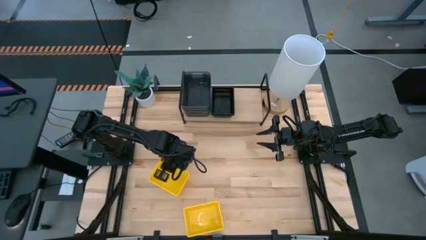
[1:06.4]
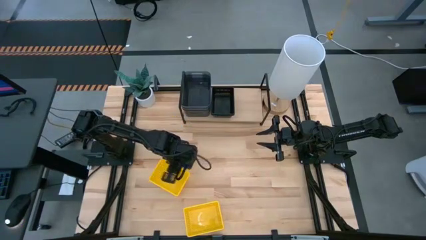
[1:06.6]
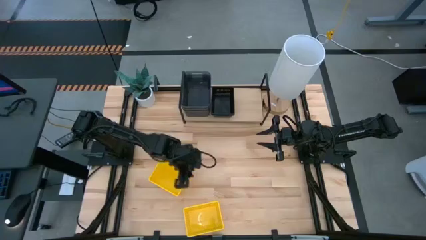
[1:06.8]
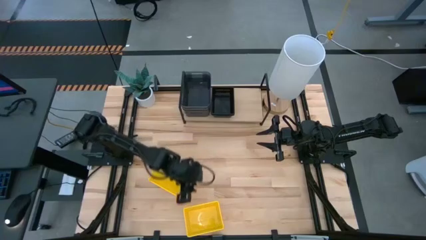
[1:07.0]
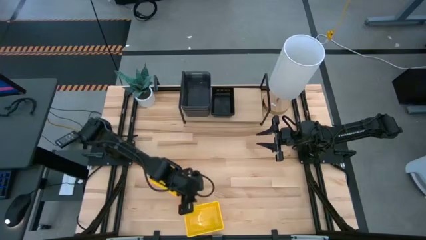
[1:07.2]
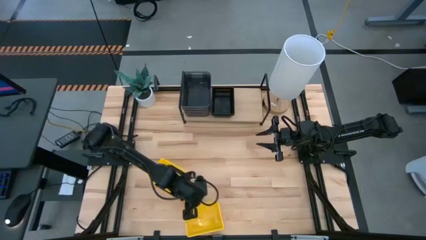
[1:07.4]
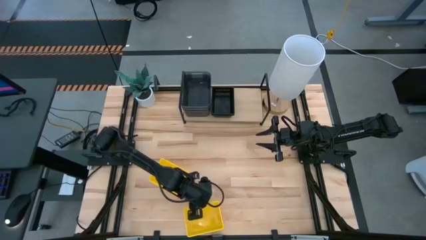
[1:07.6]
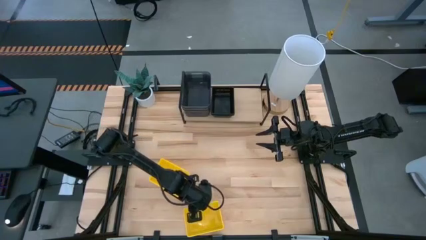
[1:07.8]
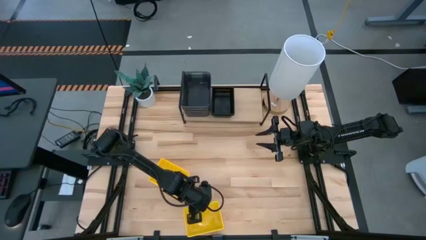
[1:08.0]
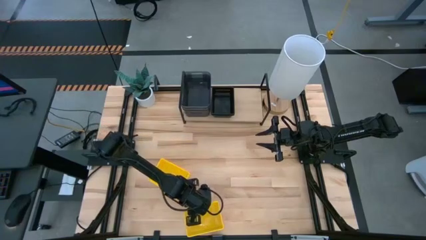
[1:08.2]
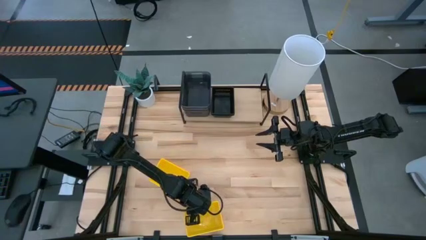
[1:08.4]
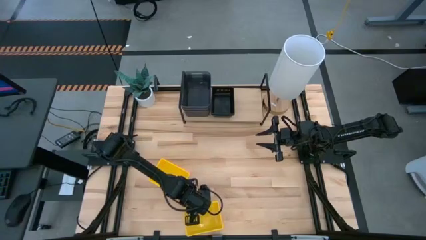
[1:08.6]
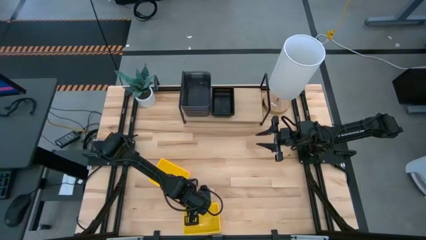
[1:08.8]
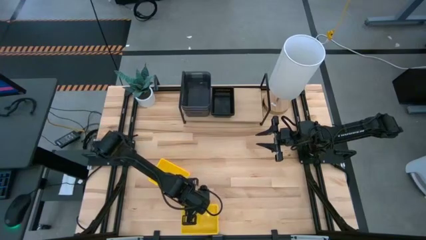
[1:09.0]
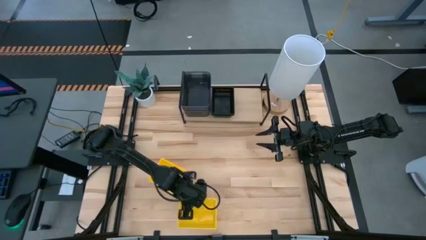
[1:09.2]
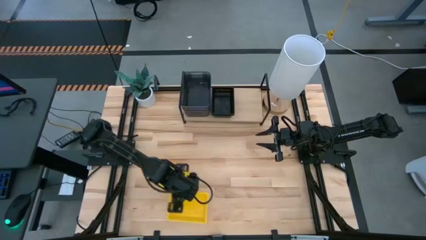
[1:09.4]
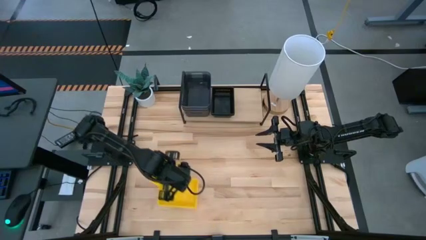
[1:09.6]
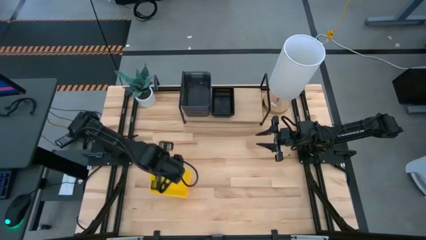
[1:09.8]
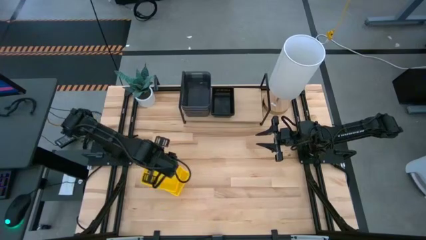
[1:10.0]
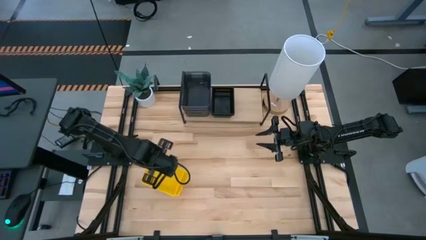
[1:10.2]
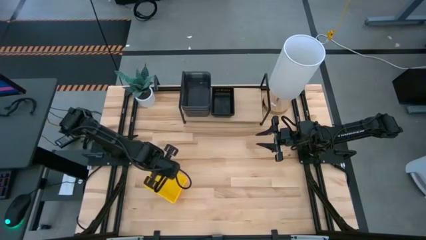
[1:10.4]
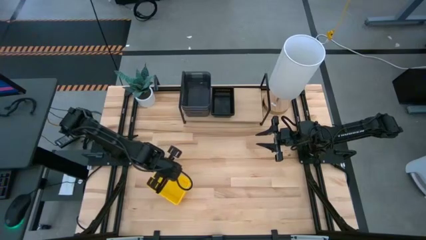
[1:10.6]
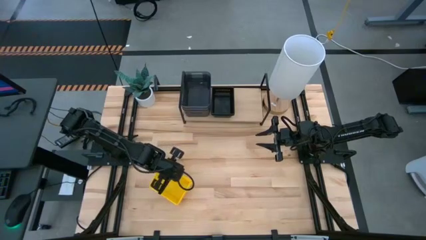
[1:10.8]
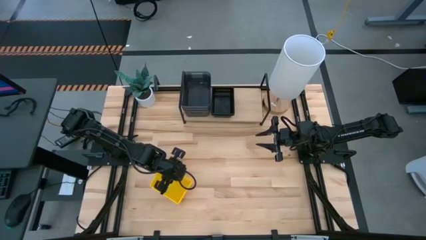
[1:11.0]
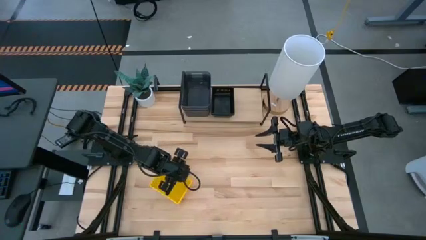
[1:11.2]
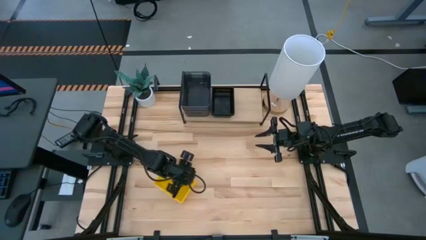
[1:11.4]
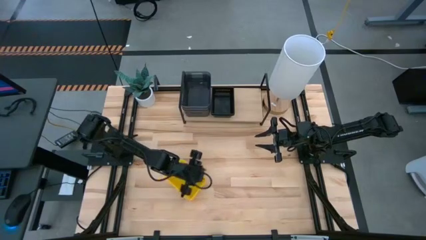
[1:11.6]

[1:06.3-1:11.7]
Task: Stack baskets on shelf by color
Stack the bottom yellow bin on the stacked yellow bins

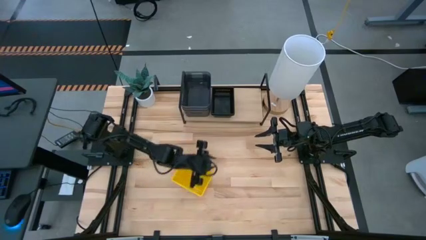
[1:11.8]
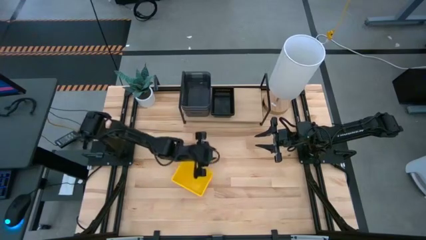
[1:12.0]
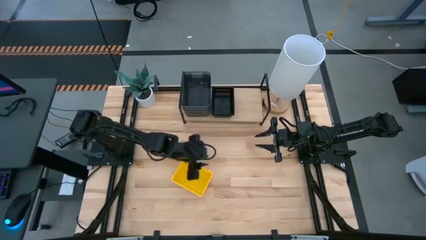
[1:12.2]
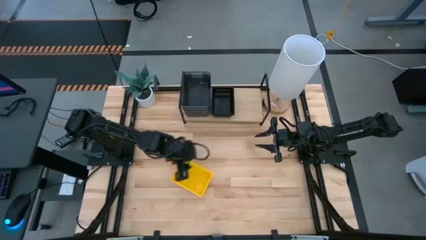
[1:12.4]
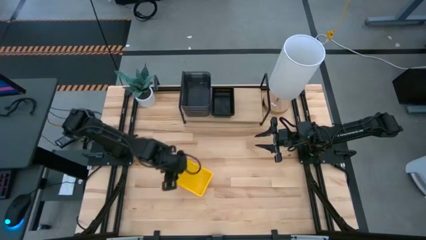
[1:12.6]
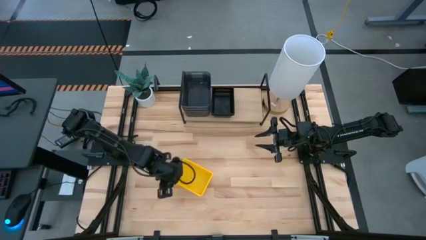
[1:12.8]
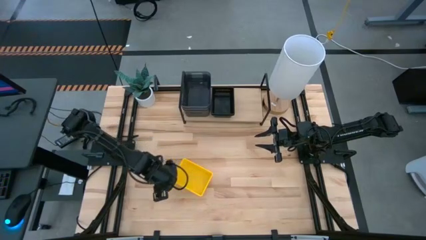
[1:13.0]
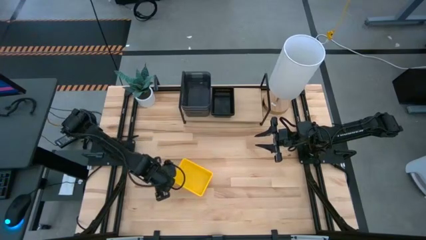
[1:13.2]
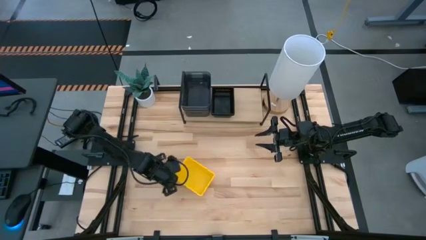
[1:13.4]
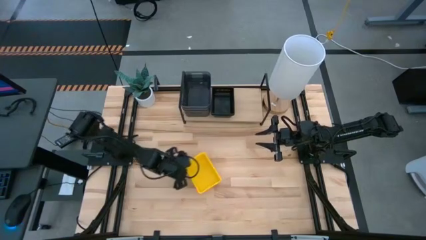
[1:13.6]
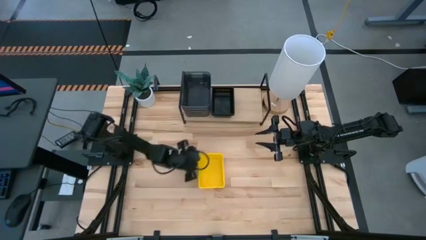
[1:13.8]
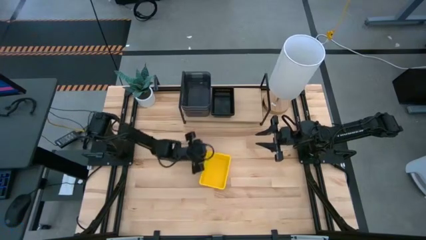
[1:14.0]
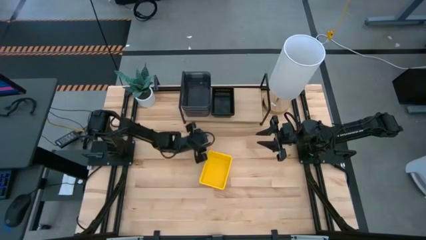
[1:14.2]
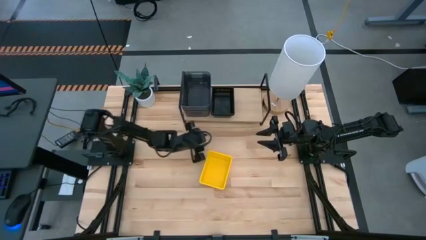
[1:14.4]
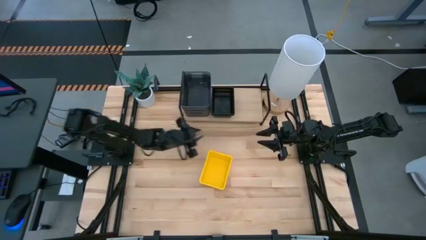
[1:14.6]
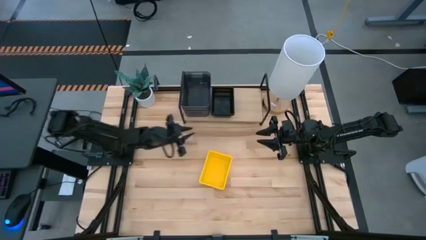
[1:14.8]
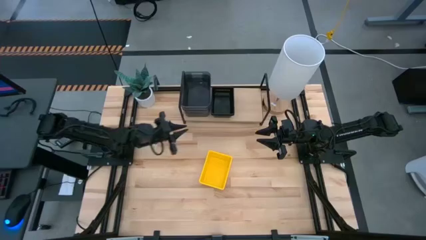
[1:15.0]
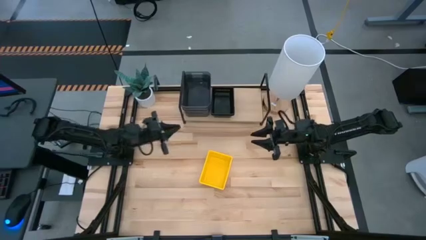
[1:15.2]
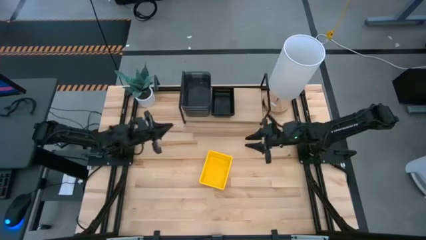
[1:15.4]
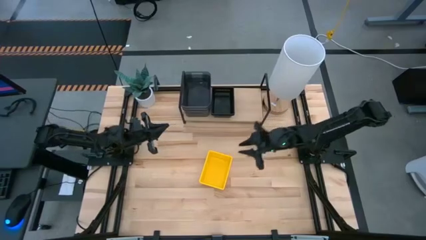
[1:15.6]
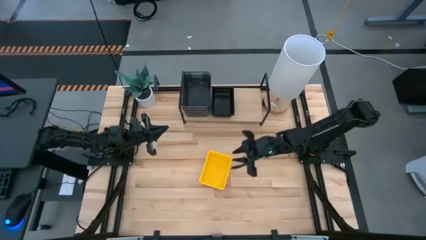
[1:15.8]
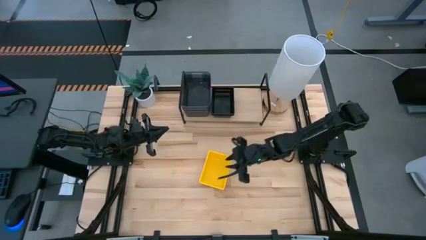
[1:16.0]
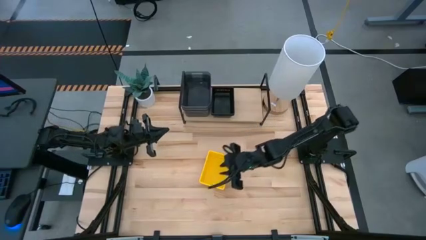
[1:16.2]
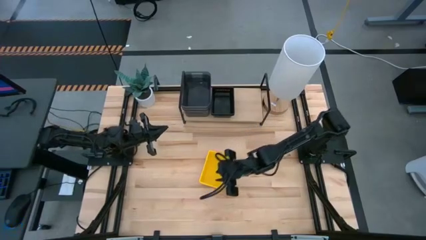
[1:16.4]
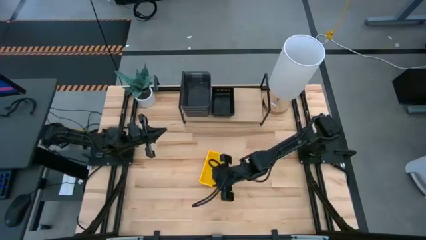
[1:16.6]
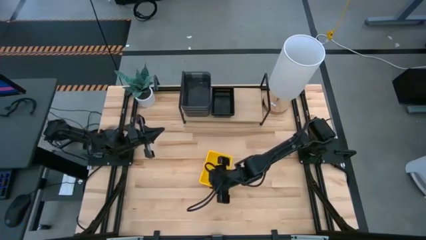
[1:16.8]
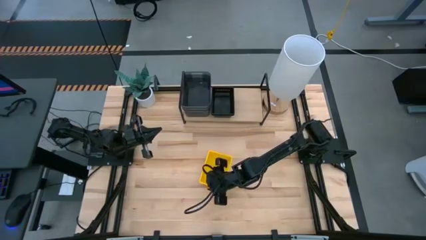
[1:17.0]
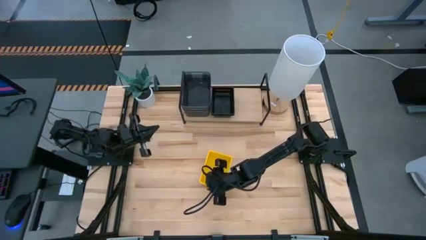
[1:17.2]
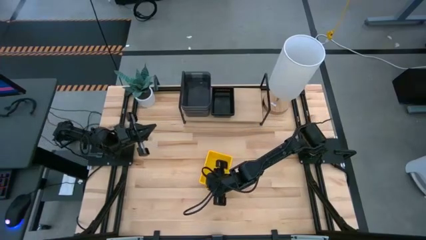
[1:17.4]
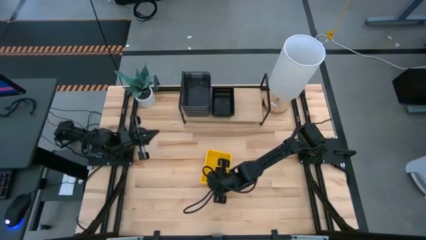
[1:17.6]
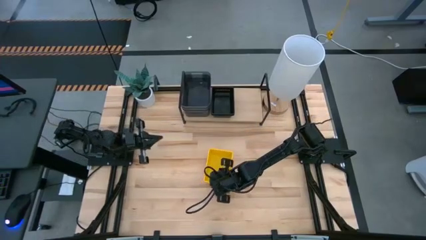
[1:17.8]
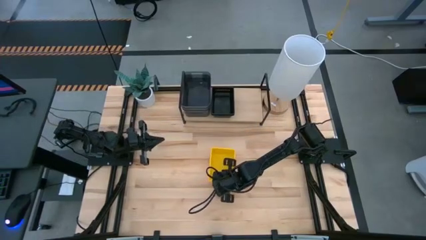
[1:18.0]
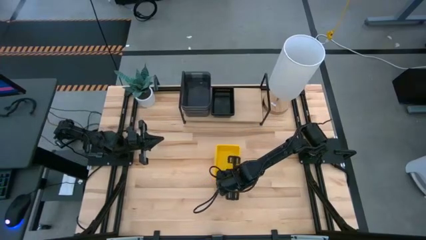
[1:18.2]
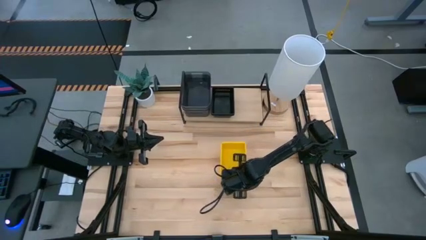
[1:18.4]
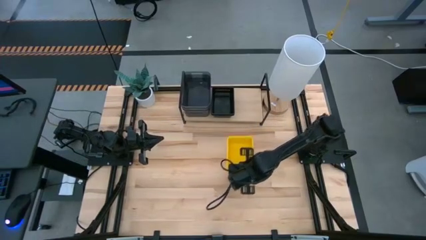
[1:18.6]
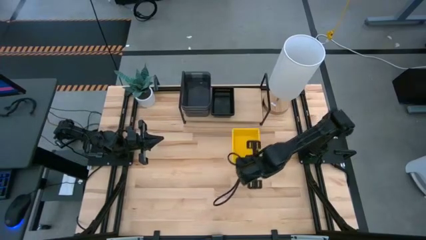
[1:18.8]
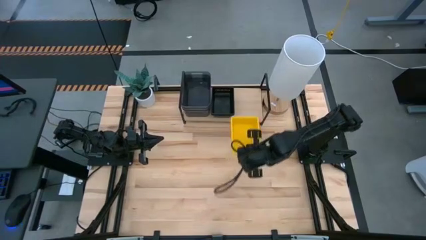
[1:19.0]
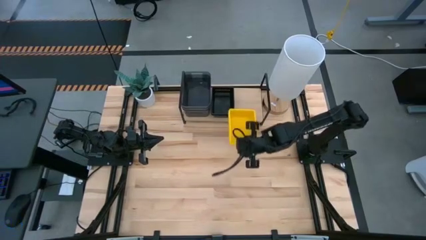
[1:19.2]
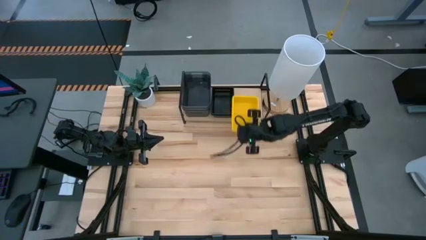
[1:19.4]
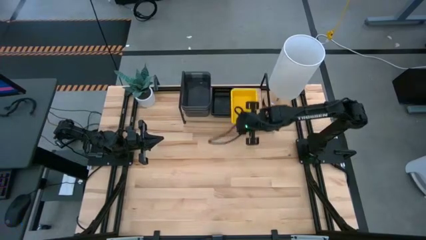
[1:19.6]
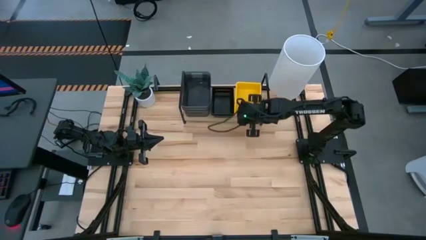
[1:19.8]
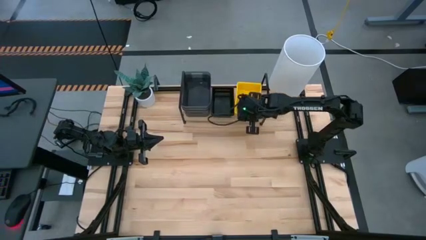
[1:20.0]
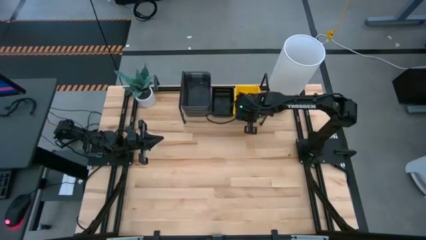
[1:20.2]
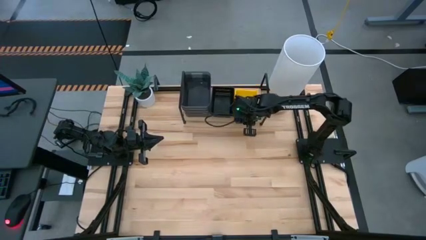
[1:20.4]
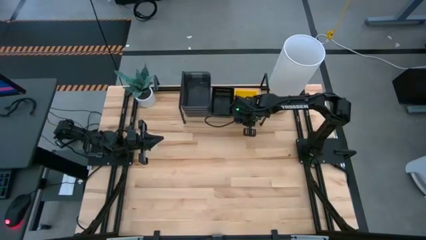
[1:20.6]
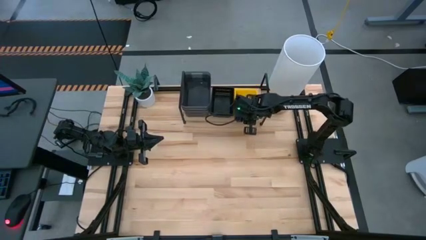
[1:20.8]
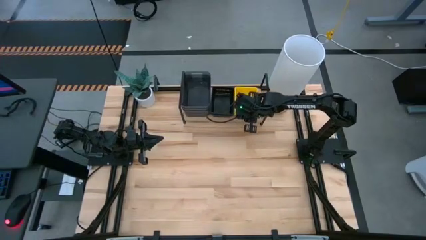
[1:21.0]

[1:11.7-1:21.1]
Put the stacked yellow bins on the shelf
